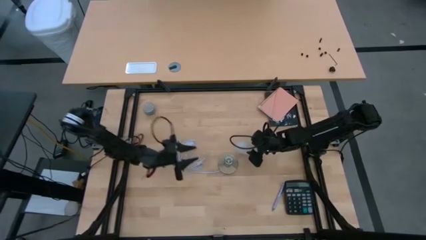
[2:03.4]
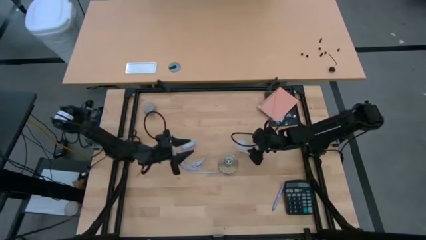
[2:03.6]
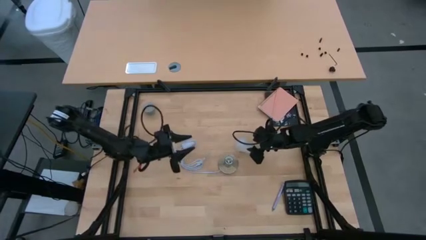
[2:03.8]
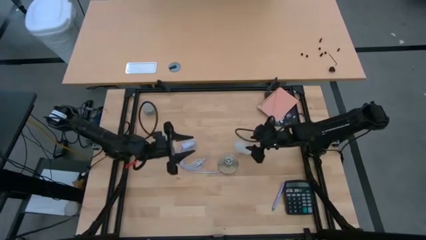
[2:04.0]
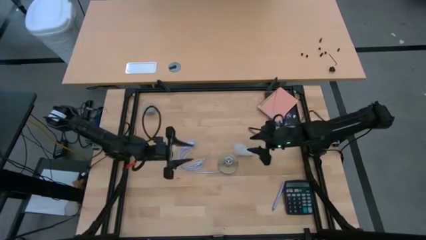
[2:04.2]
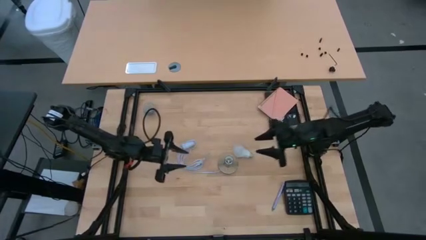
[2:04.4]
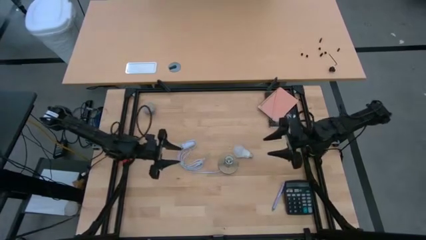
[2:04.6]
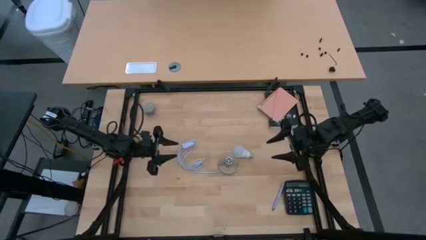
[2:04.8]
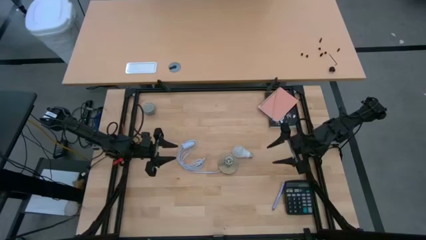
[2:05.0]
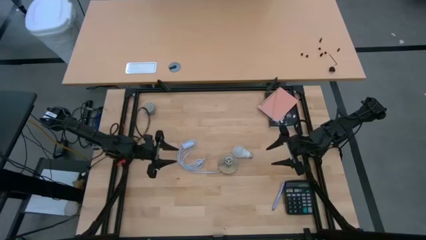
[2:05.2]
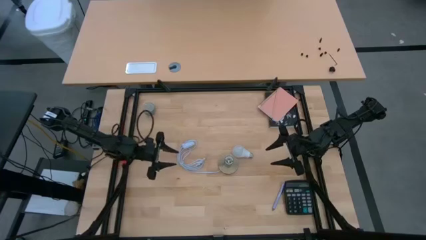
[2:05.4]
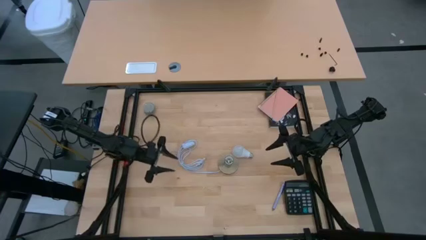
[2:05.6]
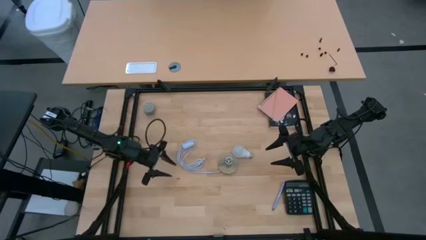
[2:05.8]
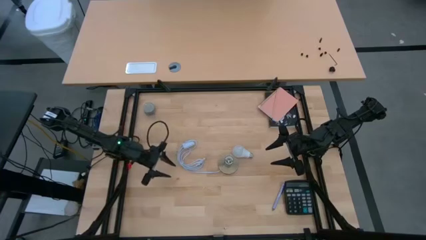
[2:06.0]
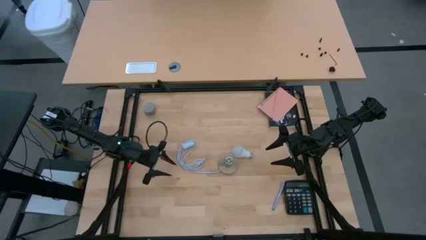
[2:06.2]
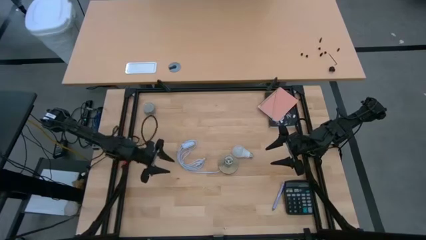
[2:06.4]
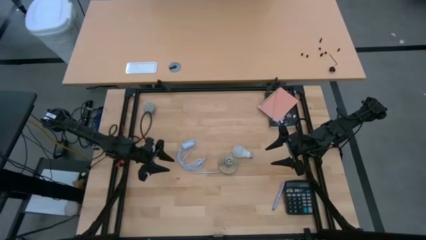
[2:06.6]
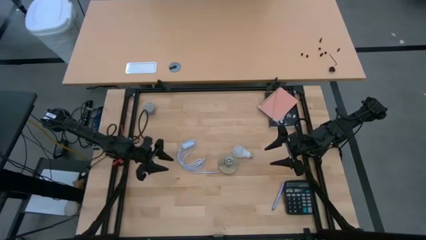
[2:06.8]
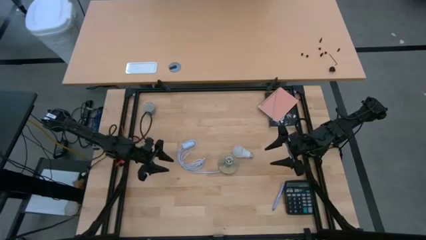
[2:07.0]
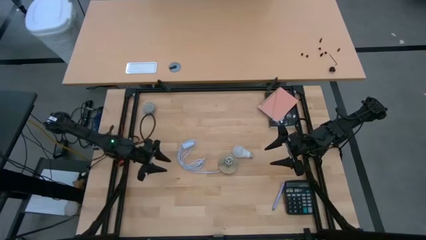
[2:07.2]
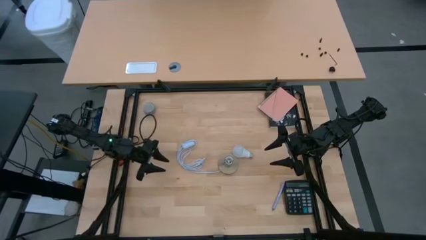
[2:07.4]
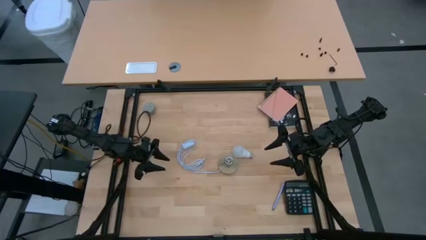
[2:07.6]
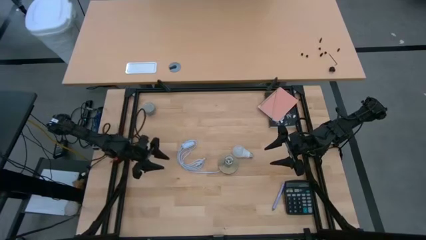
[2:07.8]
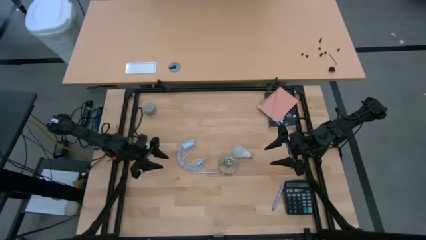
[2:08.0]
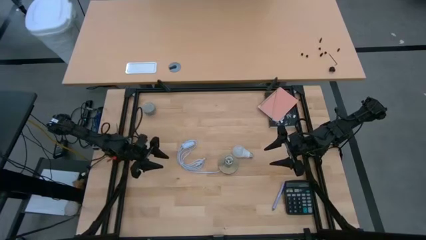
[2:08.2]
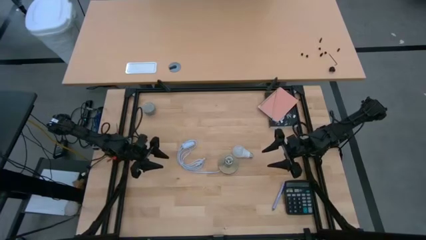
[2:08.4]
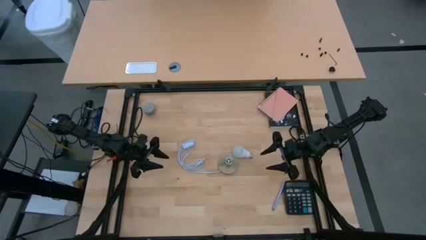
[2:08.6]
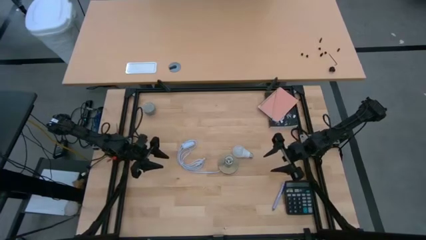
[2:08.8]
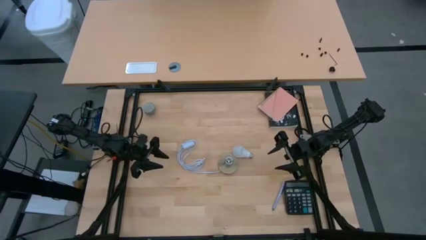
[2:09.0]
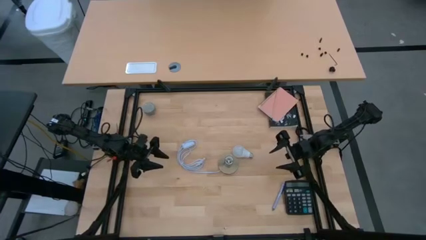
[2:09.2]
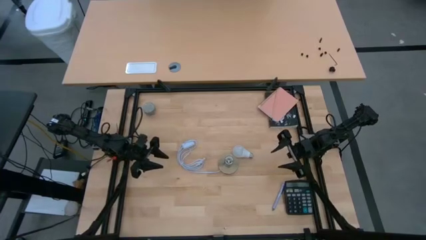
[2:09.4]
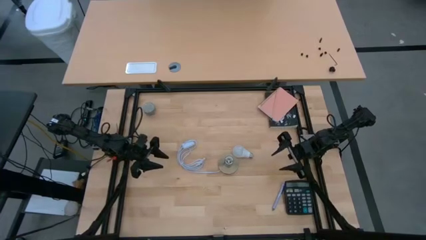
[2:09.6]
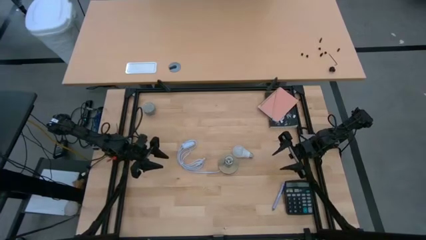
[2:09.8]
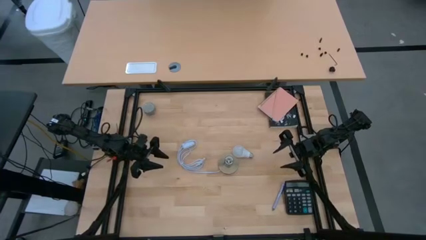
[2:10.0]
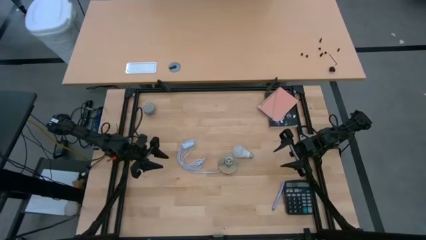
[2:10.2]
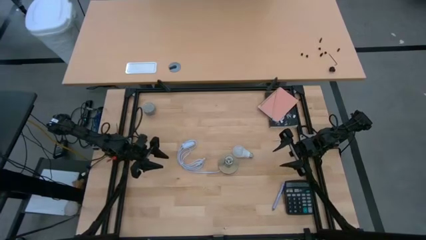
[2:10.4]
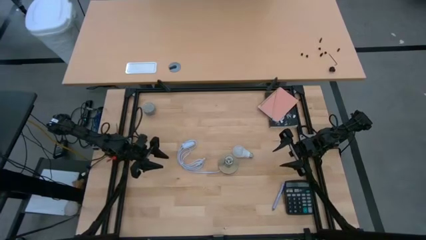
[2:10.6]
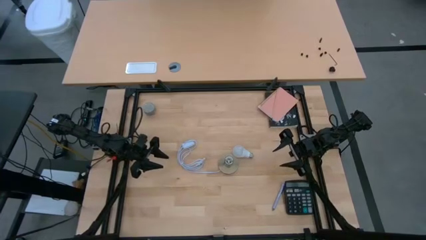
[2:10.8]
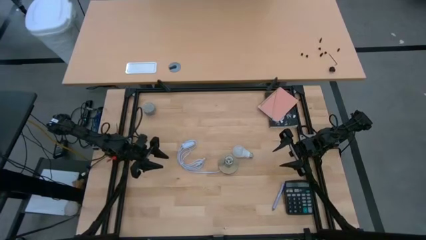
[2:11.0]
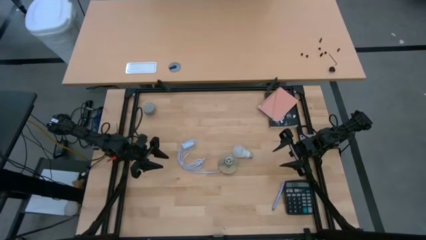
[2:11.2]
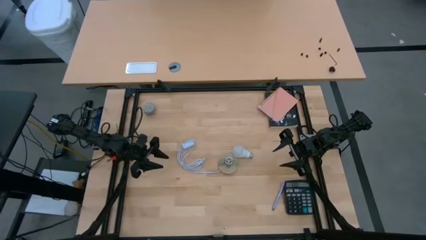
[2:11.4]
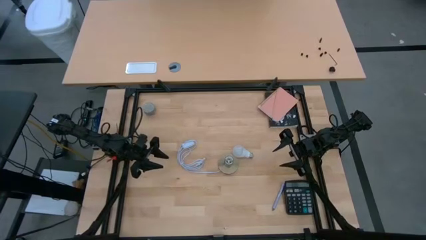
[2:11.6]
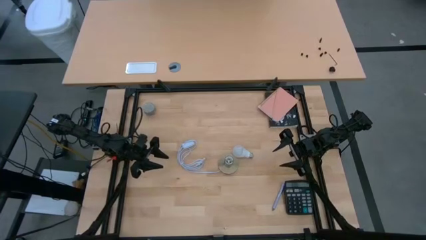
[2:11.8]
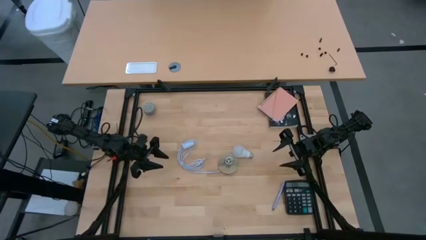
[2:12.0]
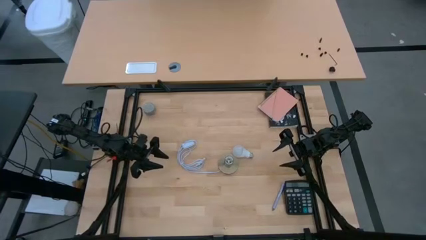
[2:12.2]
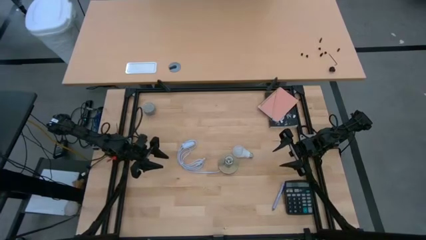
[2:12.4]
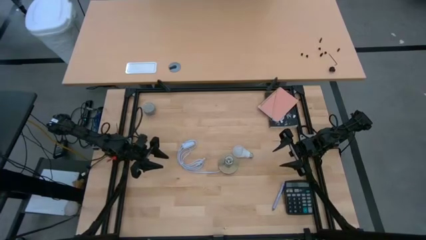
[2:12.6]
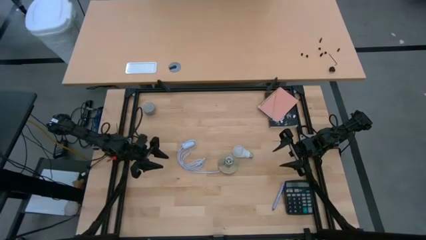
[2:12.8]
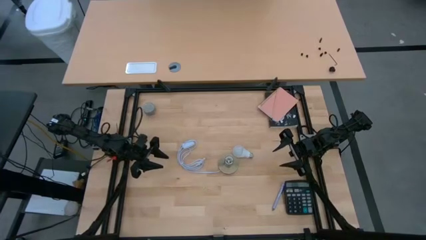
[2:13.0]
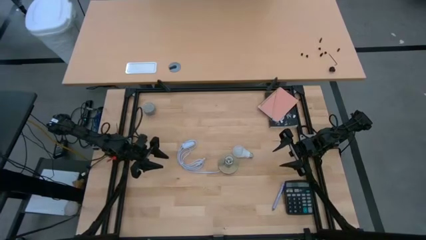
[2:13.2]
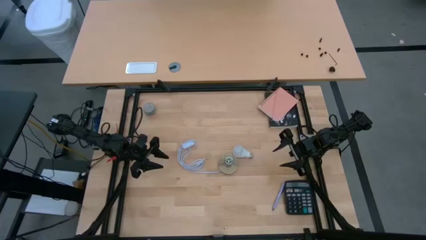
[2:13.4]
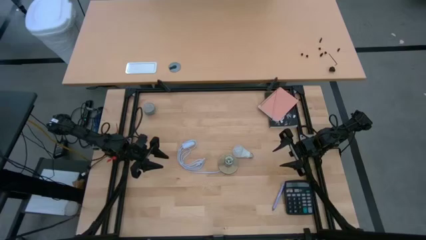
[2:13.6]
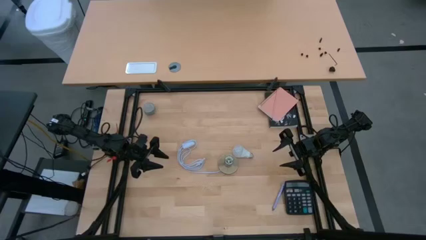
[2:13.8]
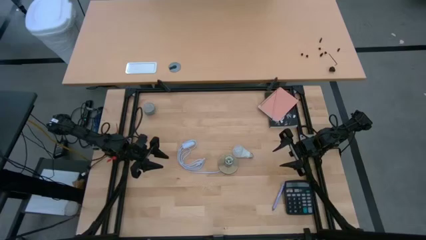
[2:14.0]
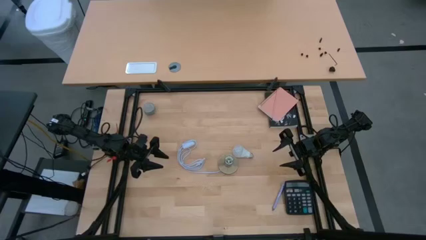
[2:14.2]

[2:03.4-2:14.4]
Task: Screw lightbulb
Return to Home Position

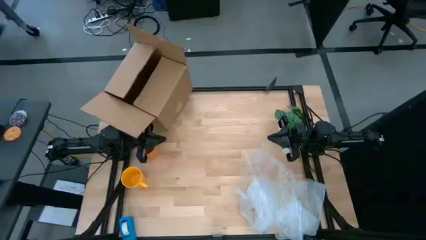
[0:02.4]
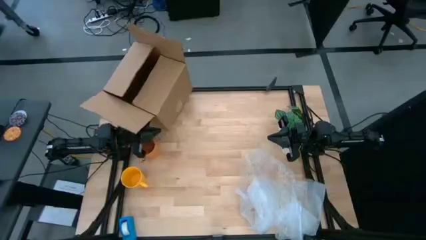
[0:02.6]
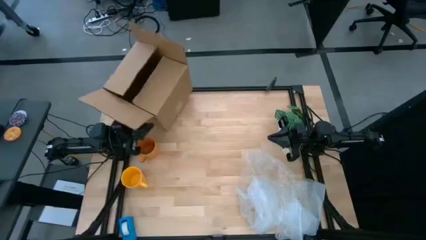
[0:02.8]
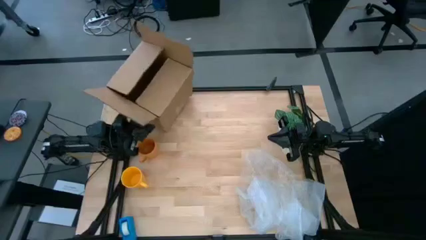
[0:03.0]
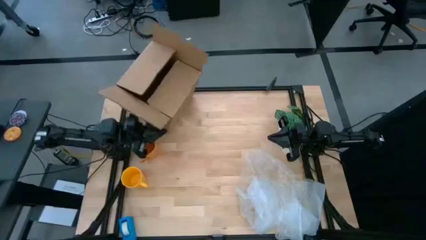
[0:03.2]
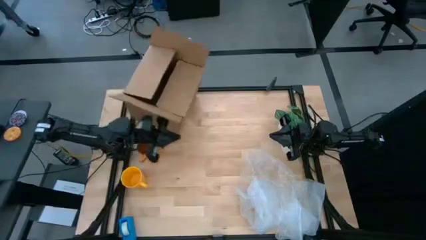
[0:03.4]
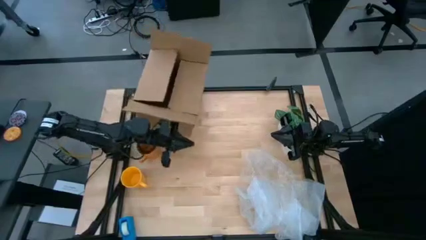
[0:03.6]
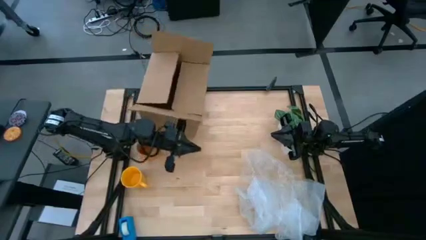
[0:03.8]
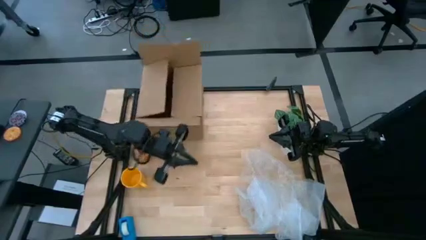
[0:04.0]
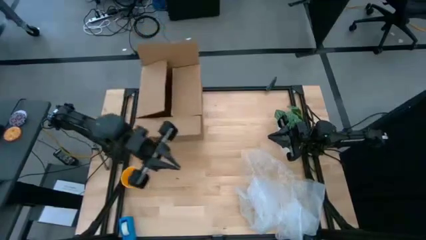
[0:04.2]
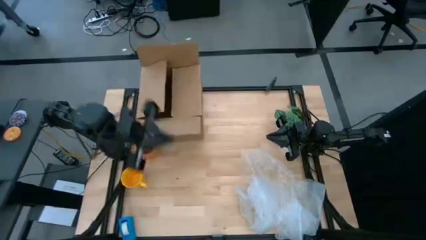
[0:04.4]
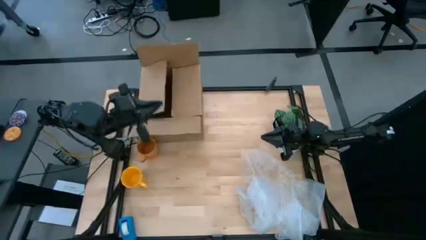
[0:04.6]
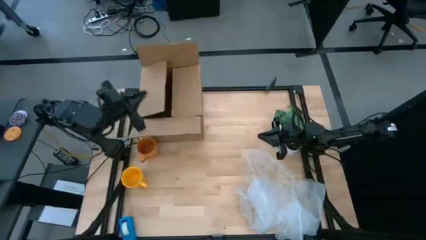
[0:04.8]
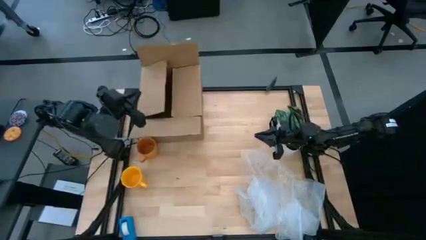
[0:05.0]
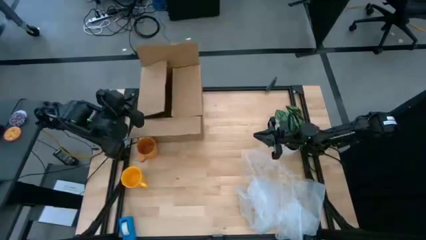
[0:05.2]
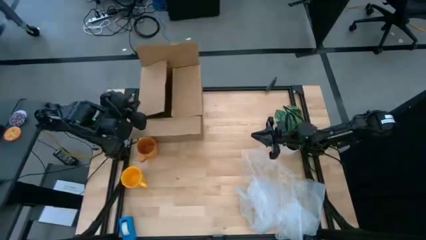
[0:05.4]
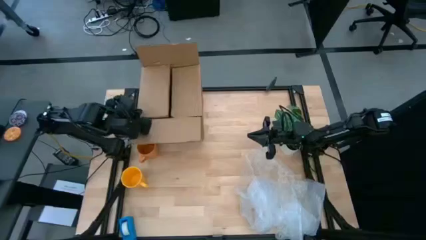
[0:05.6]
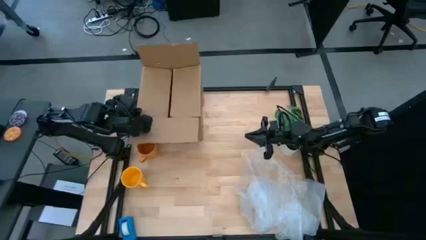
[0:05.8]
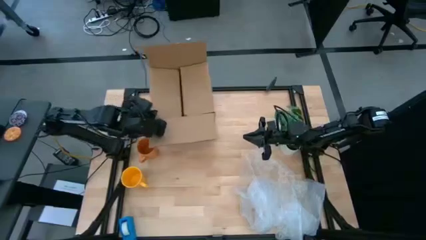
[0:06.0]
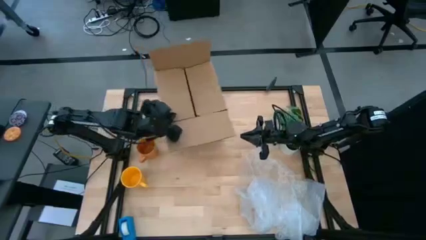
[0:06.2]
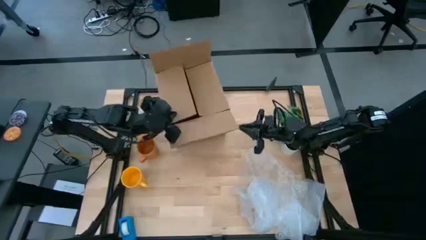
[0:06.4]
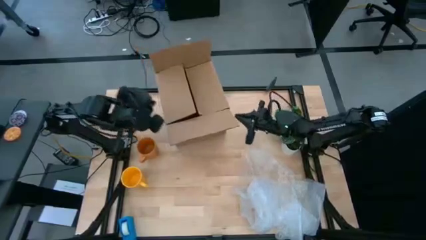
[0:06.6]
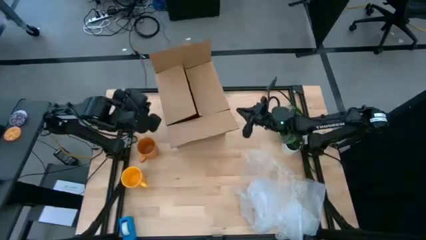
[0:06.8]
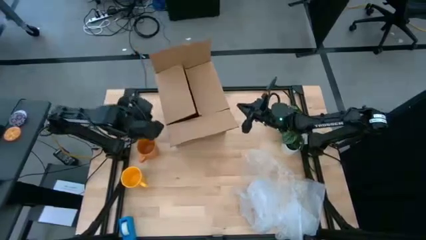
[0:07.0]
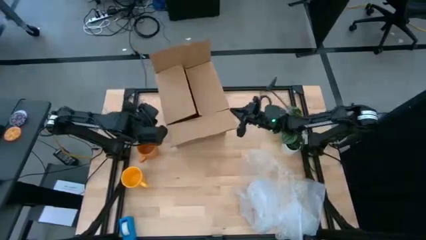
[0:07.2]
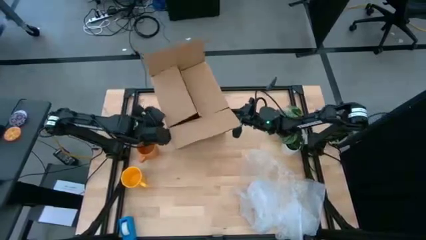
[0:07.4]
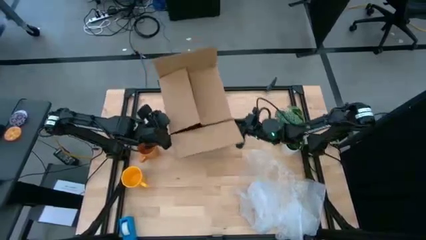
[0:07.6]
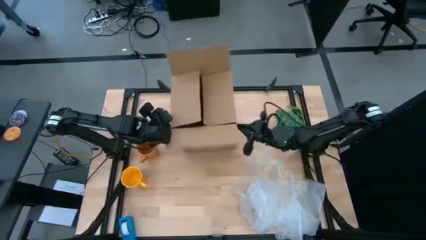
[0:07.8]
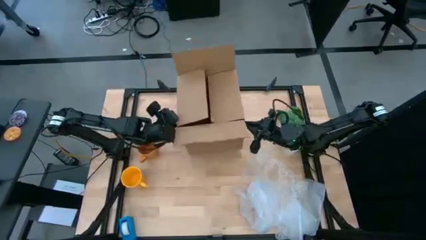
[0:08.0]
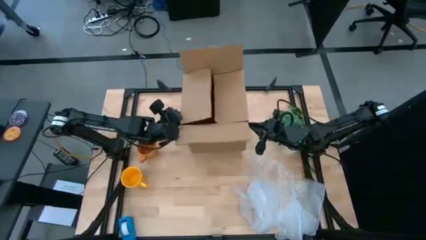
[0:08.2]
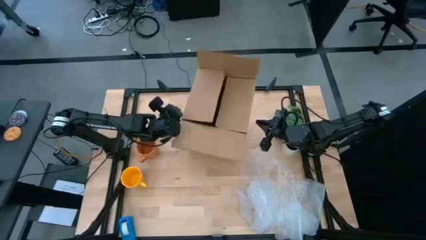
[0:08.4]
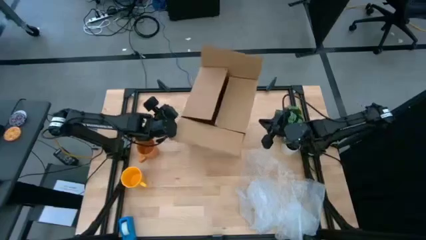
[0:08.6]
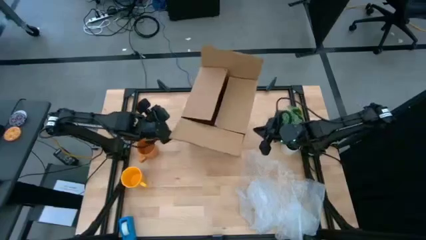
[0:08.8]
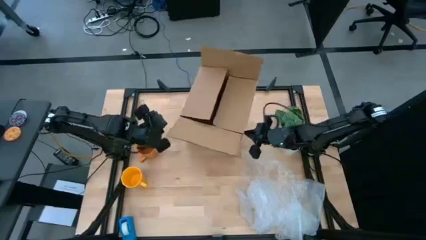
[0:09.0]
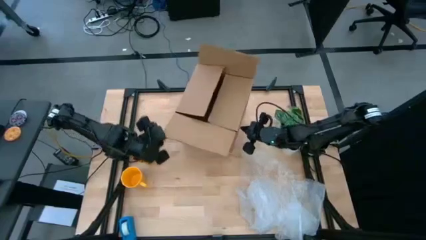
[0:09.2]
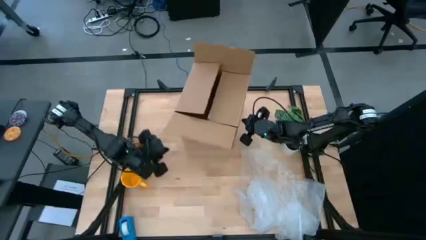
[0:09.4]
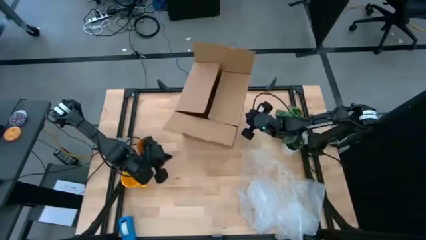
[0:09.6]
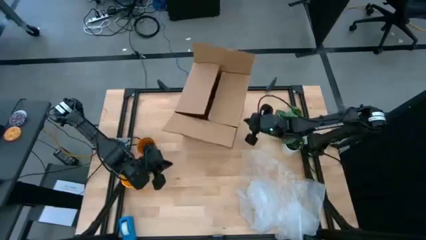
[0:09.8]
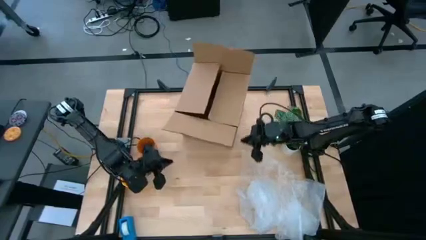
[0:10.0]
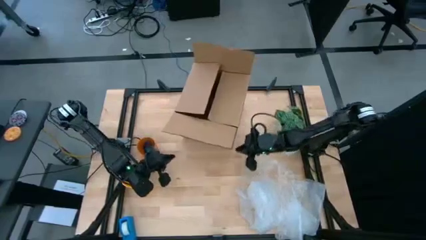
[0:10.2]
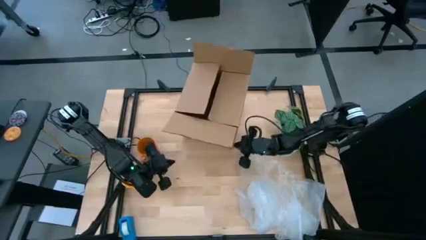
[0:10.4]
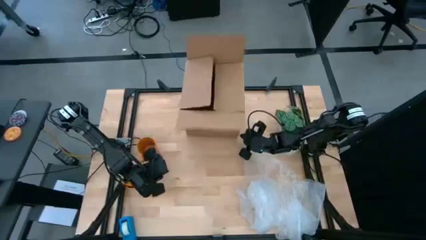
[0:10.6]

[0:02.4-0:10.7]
Task: wrap mug
Move the brown box to the top center of the table
